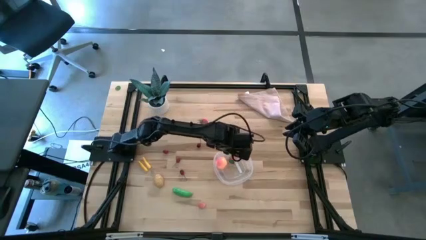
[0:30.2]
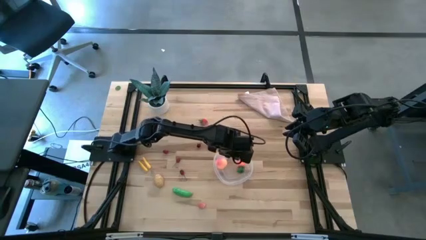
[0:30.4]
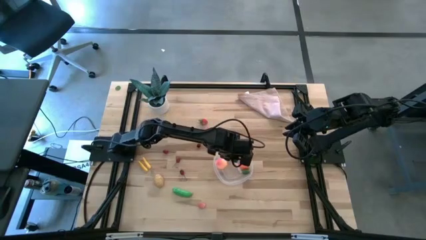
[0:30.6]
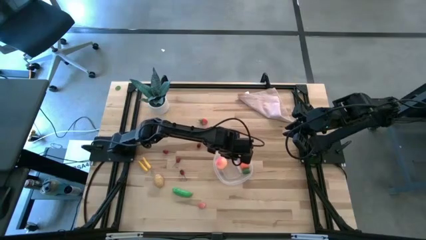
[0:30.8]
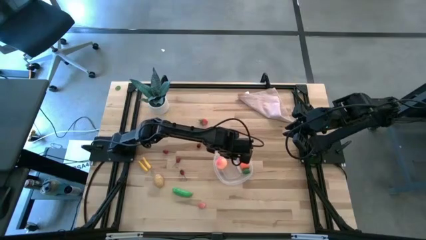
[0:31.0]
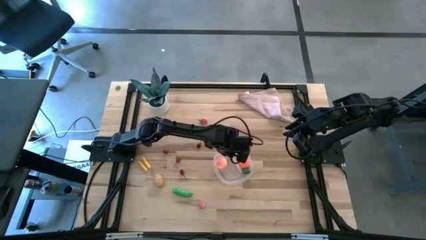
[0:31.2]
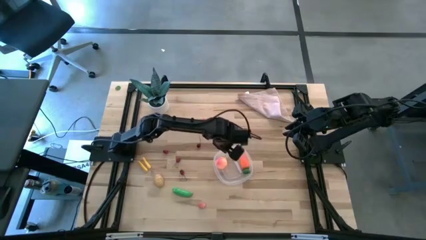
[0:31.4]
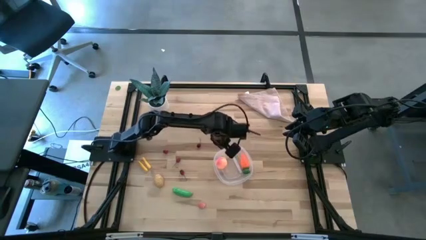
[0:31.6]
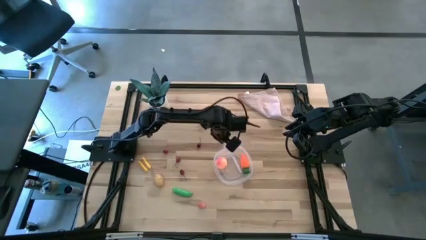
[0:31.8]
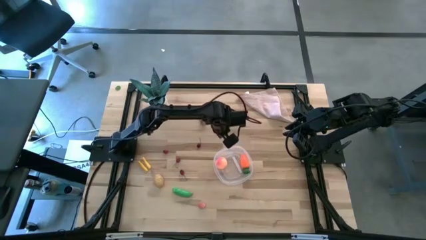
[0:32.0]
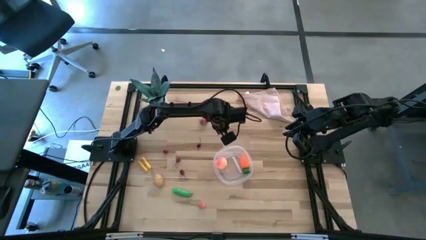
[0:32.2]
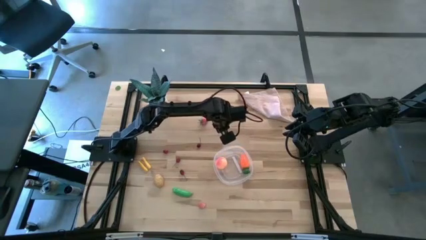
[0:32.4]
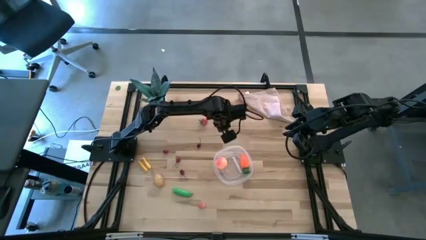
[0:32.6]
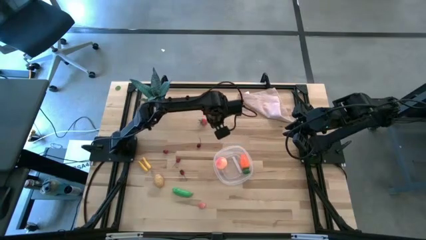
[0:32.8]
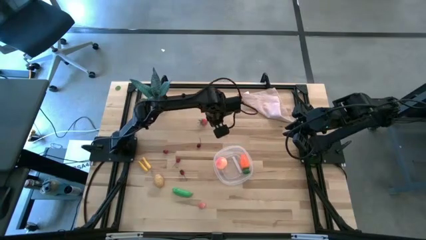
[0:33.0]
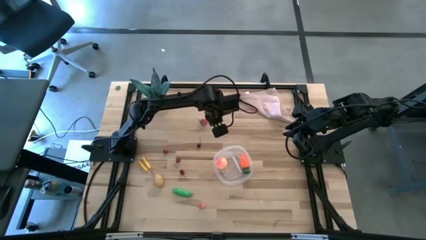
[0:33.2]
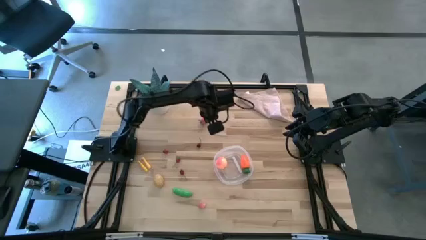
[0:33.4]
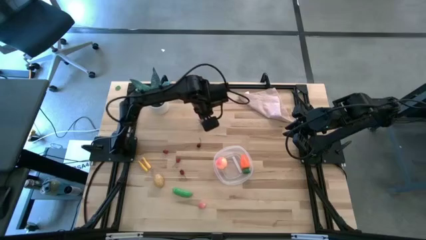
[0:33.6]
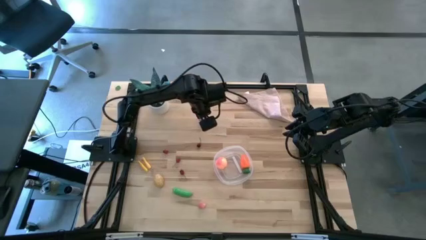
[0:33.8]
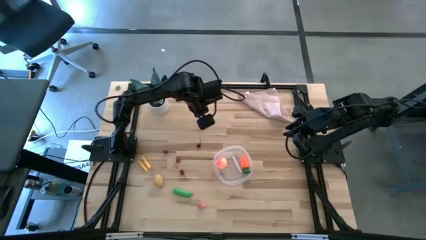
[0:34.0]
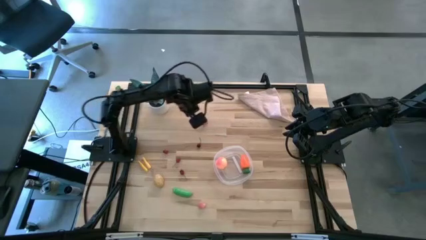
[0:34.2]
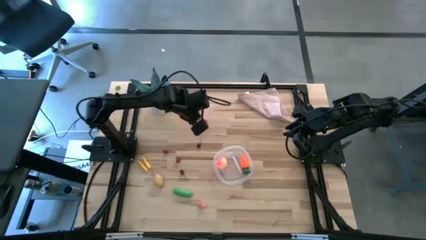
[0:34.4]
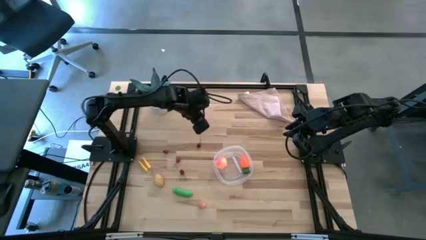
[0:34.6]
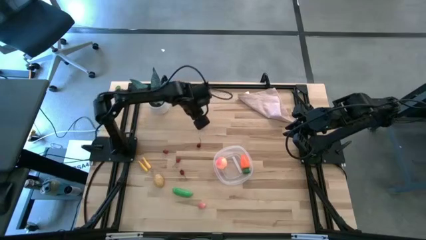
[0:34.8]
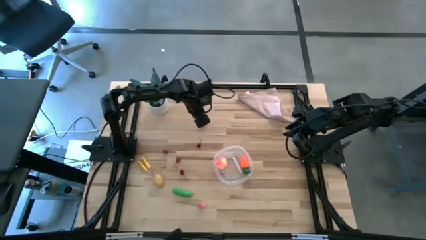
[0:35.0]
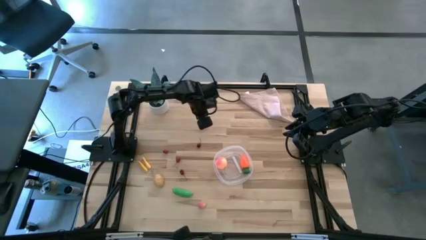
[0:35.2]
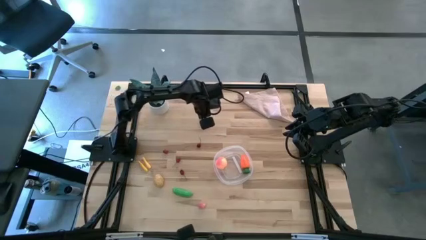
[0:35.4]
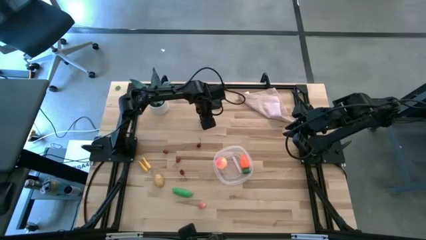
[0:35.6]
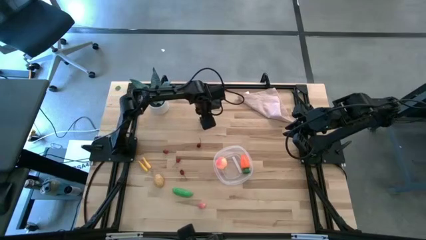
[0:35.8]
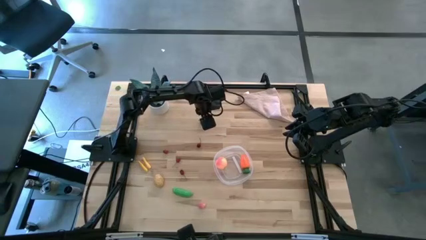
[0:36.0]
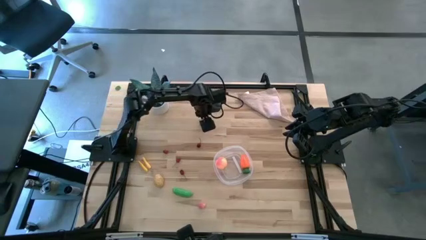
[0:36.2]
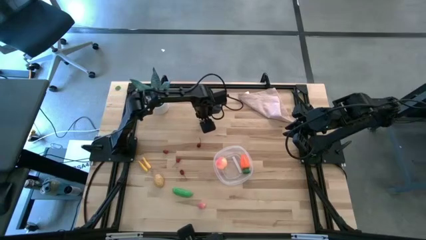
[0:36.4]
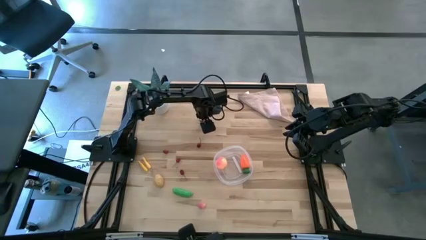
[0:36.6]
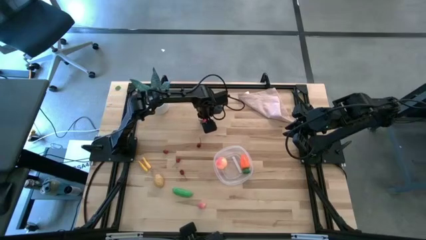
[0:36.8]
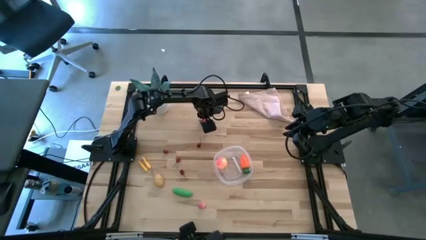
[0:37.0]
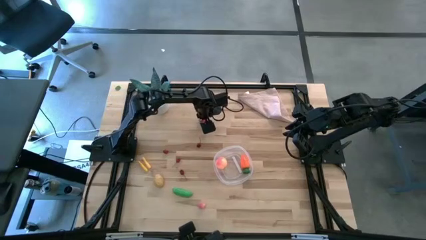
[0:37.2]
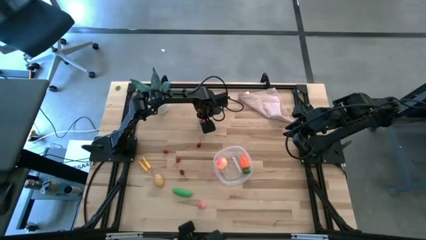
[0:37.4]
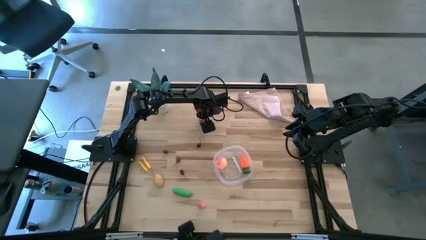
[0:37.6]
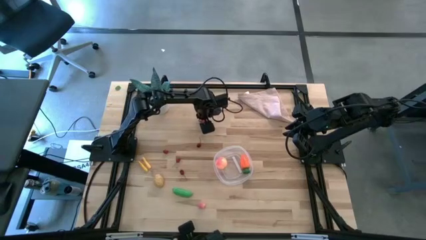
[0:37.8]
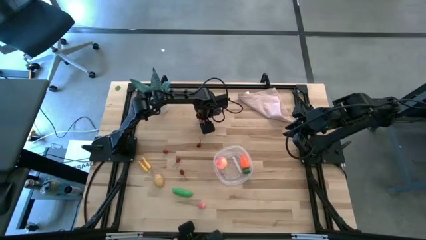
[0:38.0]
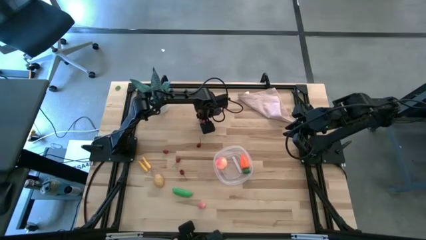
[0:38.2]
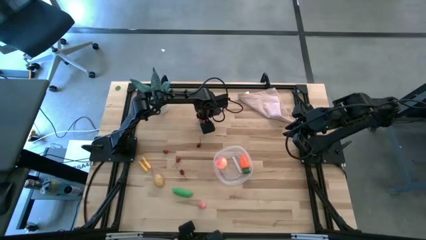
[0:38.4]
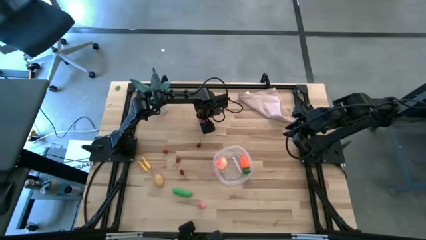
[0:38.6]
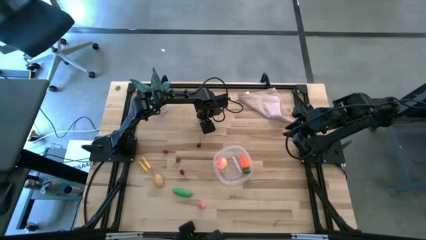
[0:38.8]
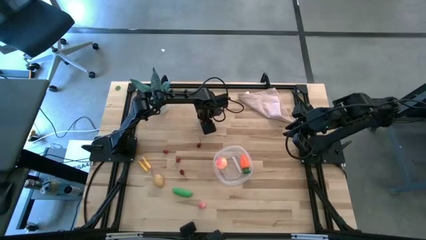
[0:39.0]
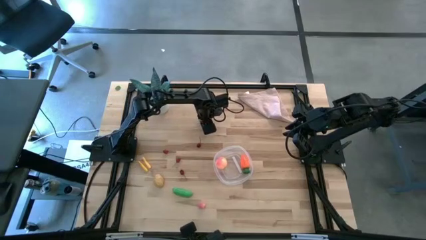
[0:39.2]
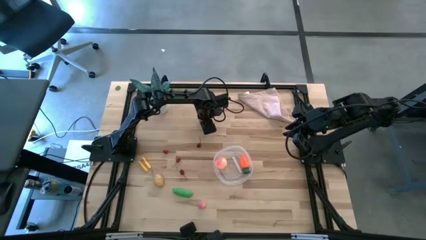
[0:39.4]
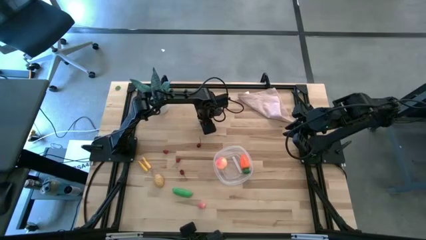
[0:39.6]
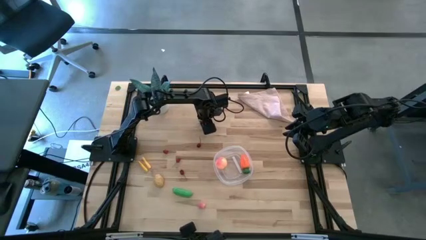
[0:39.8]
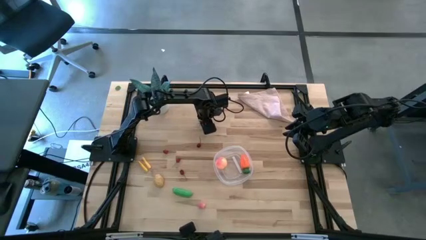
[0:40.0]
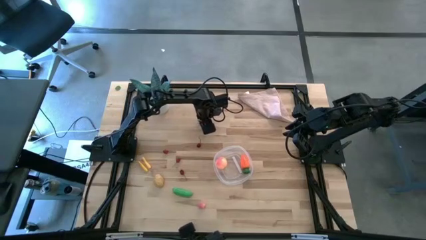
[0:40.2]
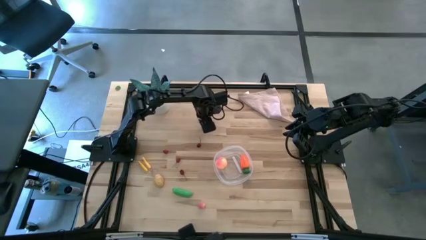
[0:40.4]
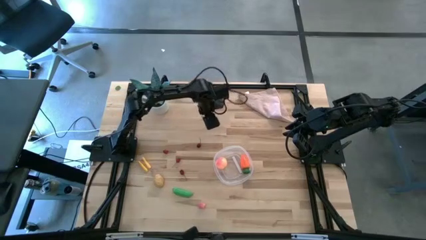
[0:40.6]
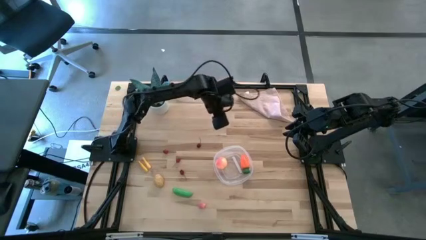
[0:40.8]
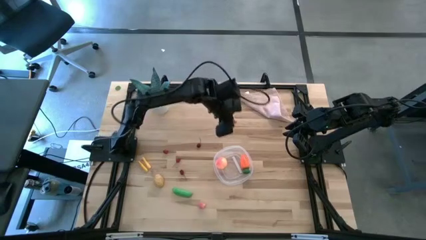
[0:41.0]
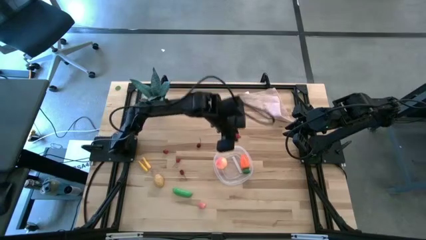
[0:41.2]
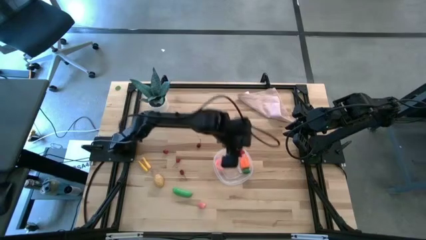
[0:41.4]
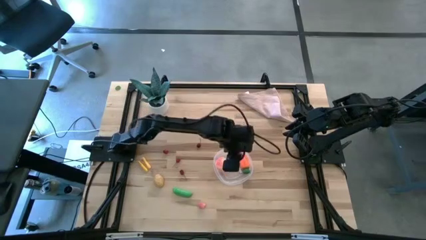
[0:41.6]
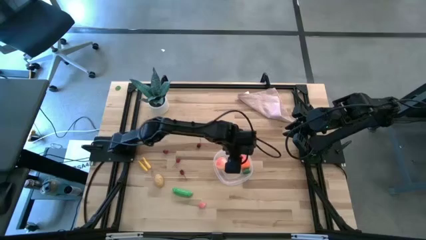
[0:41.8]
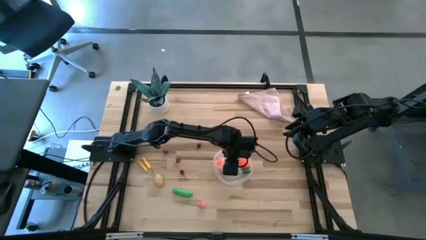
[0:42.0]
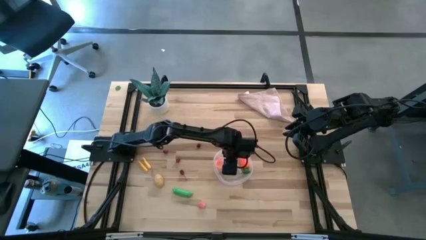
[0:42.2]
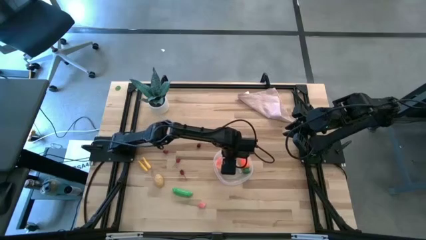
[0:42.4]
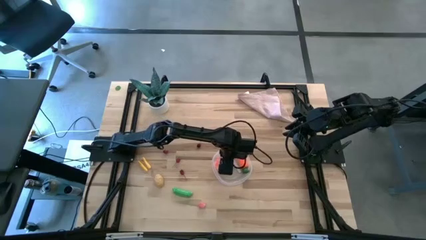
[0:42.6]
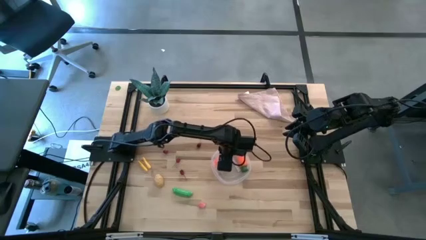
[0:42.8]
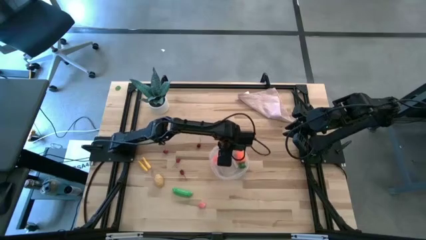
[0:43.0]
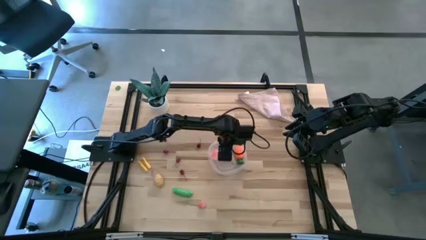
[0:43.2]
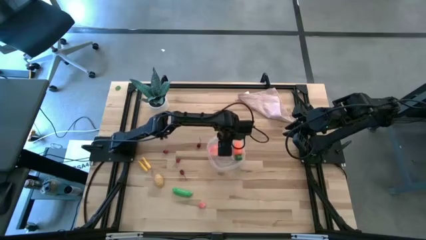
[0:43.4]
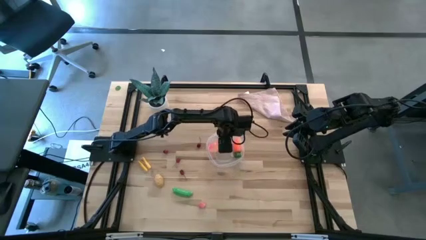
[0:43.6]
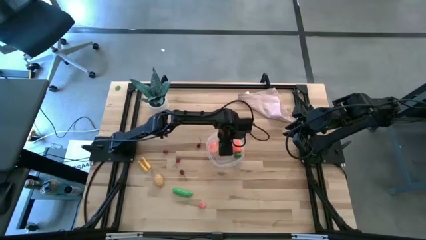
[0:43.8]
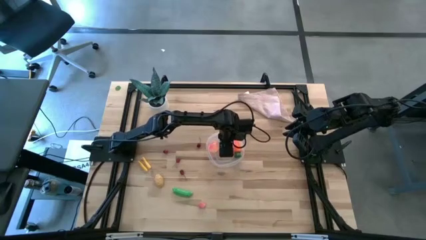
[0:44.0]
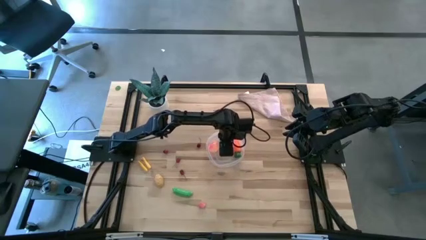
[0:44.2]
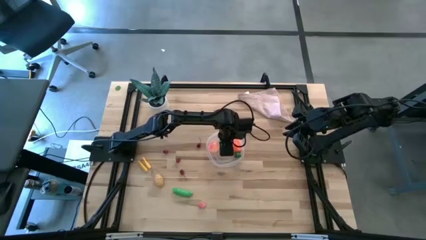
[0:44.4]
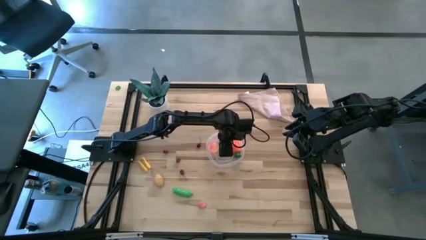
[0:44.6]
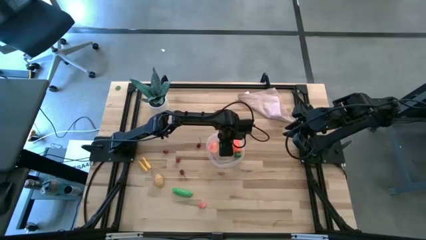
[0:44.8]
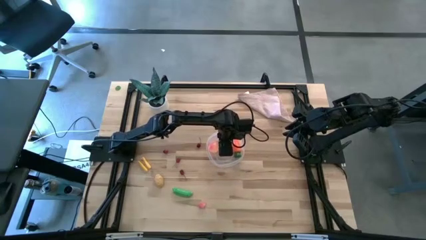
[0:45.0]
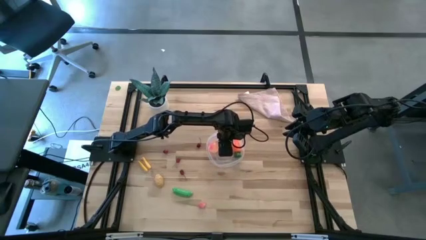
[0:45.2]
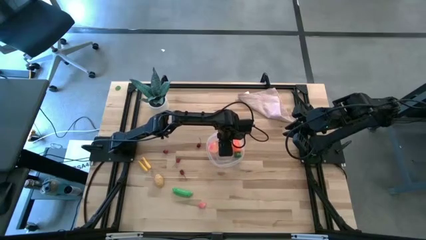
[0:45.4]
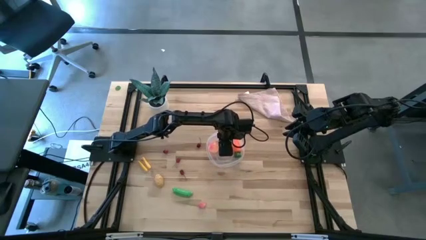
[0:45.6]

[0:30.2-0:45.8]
Task: Pick and placing Produce into tupperware
Put the red strawberry into the transparent bin

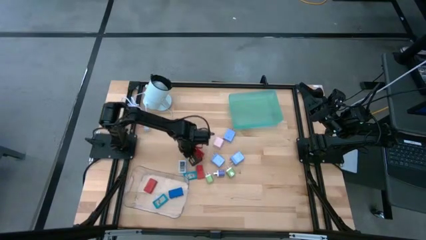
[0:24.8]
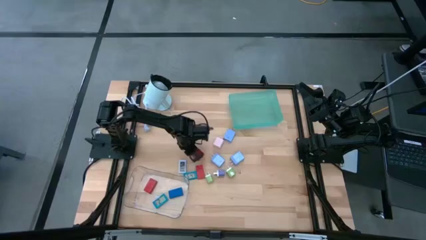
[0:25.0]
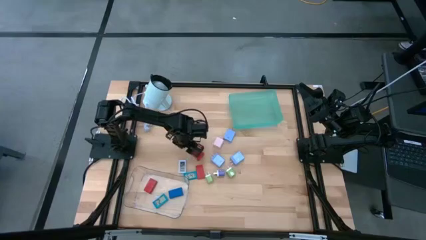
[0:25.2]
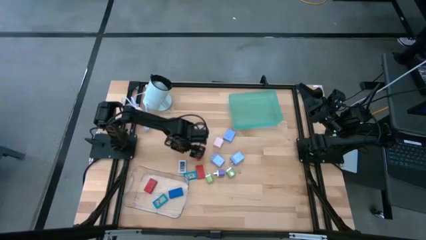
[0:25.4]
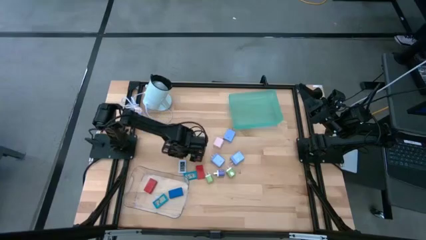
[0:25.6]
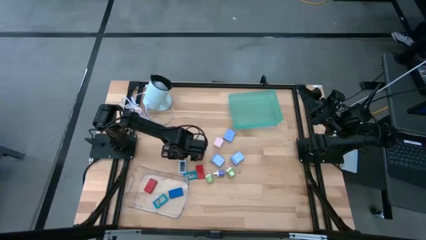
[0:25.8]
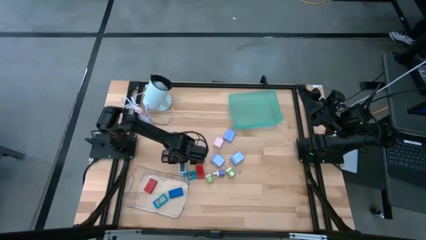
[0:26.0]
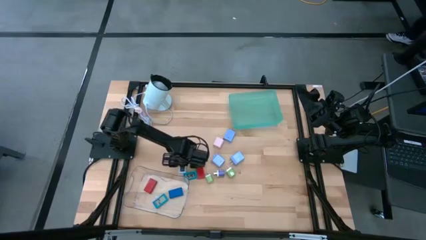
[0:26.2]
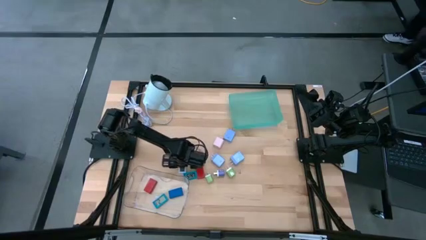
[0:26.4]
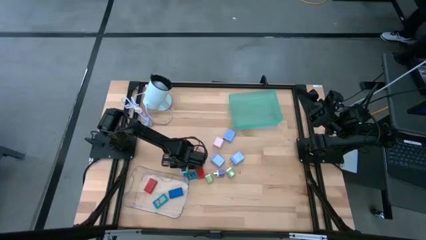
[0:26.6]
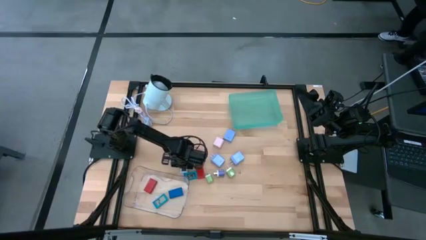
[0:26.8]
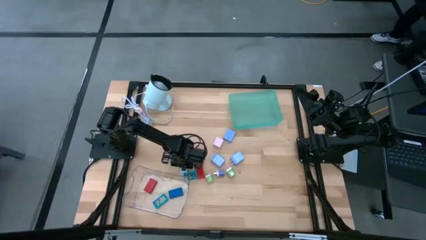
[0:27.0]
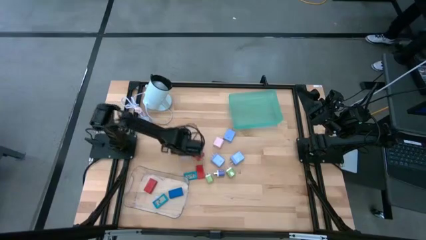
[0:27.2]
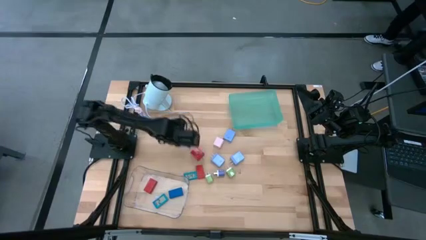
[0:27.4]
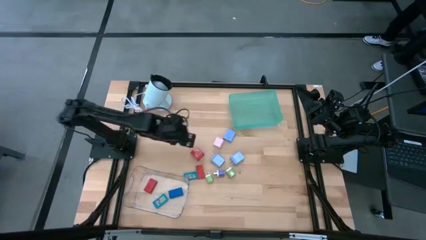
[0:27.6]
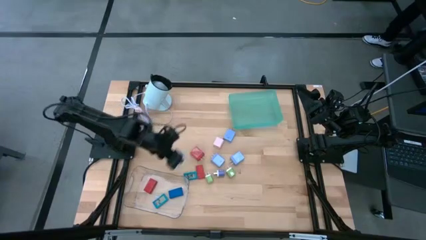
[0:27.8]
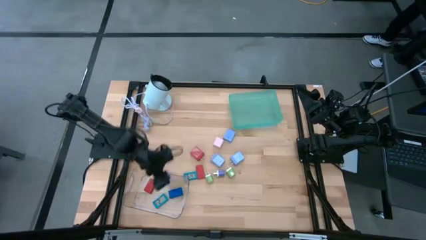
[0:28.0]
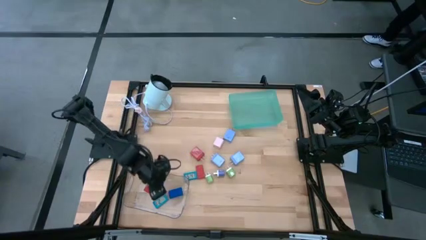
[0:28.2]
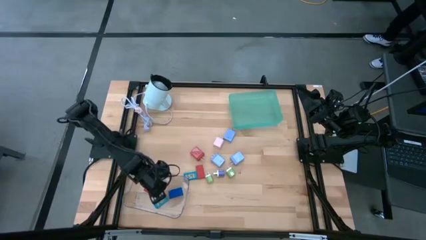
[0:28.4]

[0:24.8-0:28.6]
Task: Pick & Place Office items
Put the white digital clock into the transparent bin
